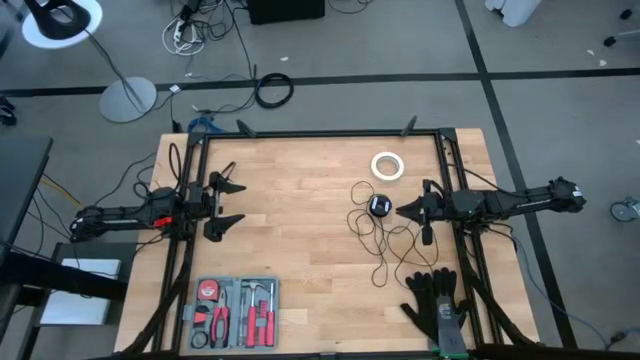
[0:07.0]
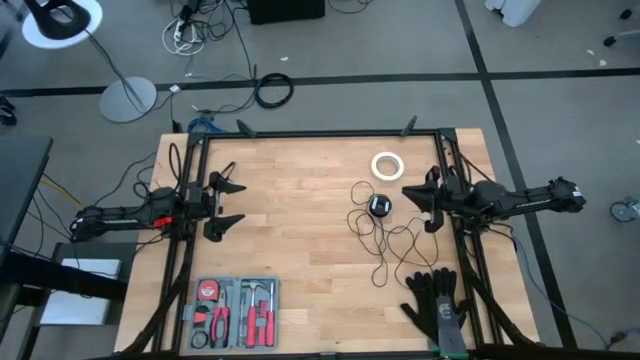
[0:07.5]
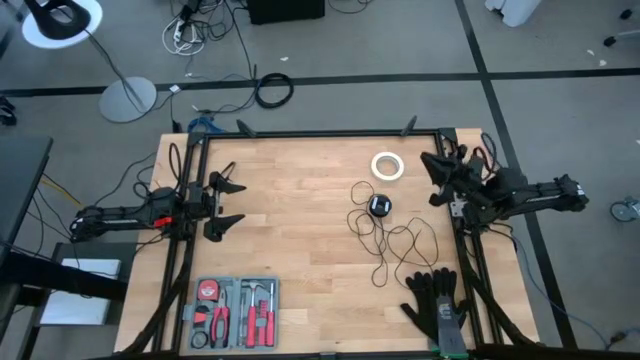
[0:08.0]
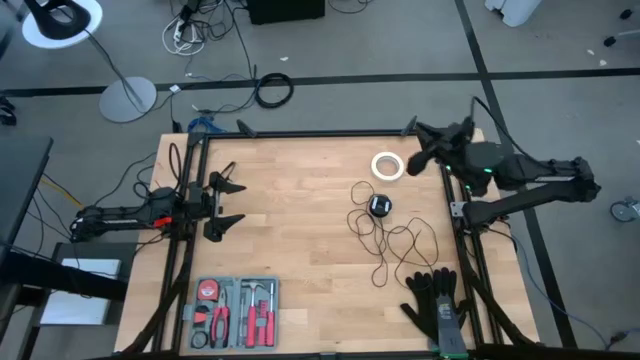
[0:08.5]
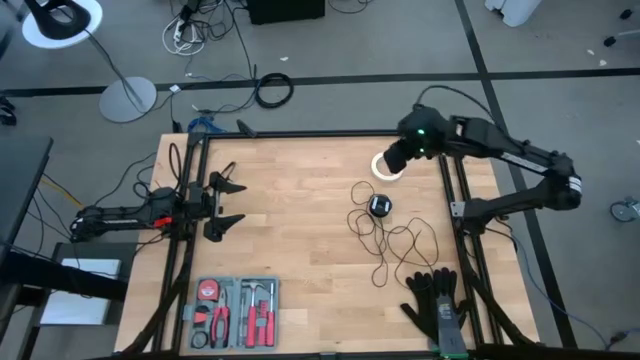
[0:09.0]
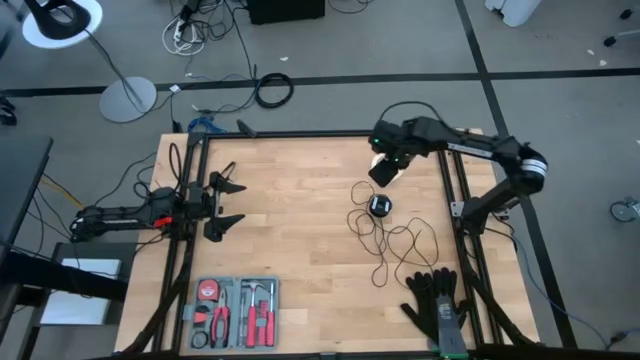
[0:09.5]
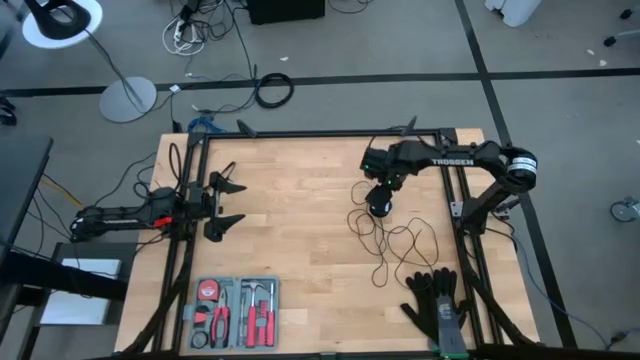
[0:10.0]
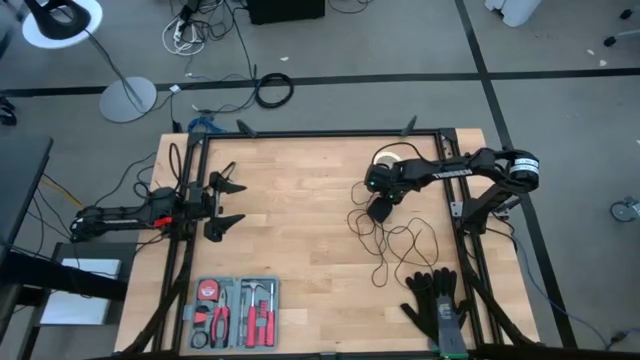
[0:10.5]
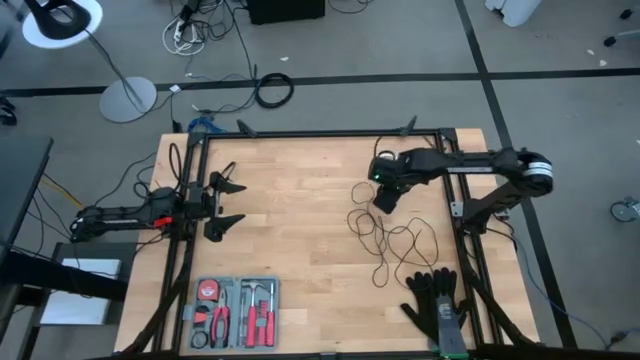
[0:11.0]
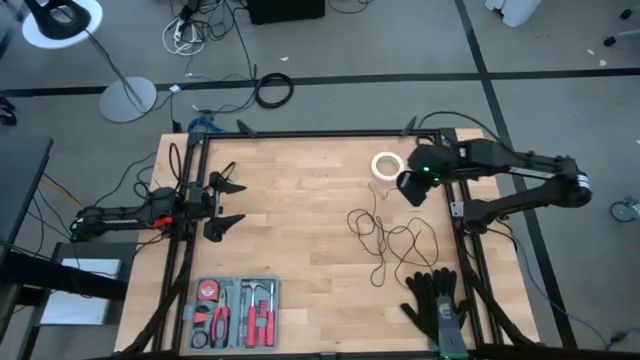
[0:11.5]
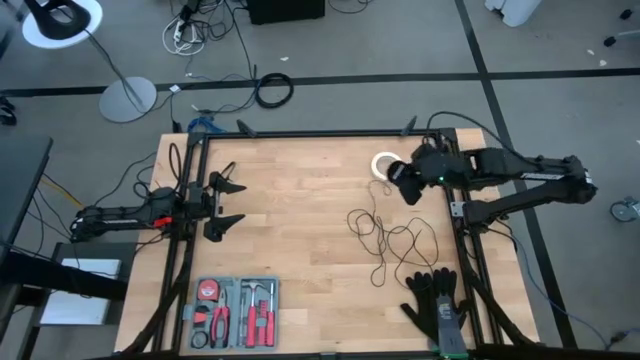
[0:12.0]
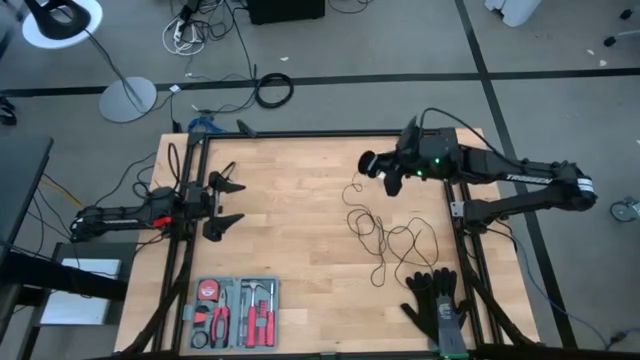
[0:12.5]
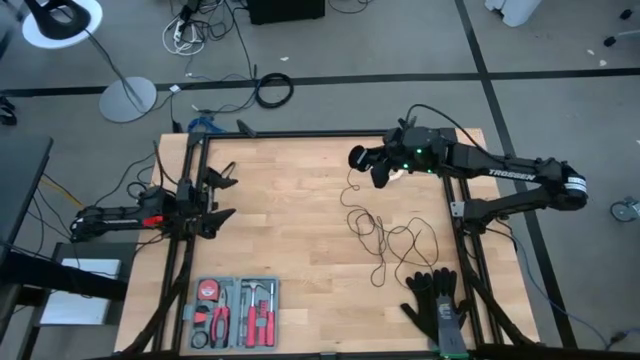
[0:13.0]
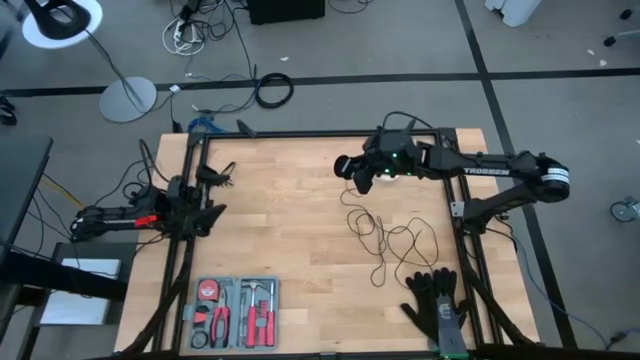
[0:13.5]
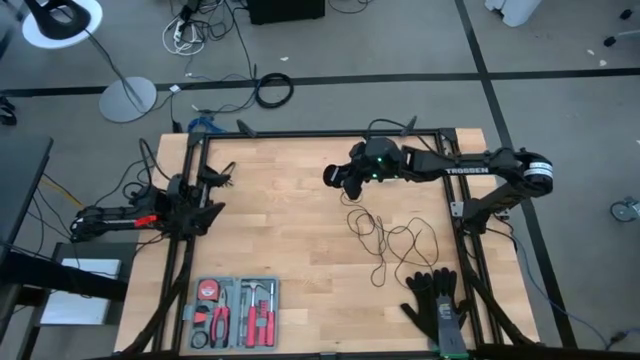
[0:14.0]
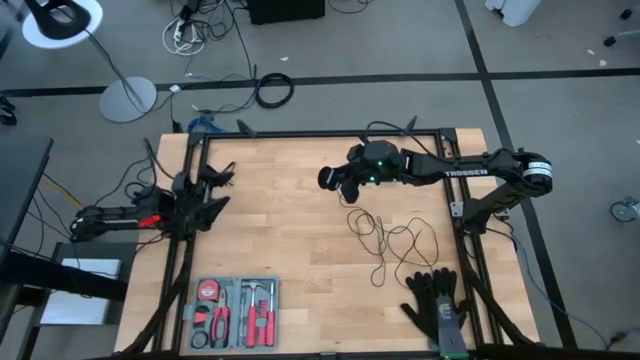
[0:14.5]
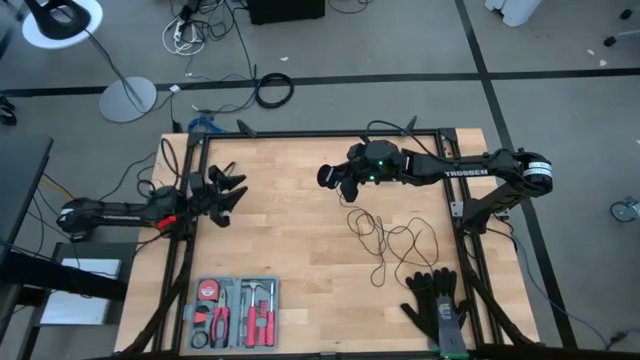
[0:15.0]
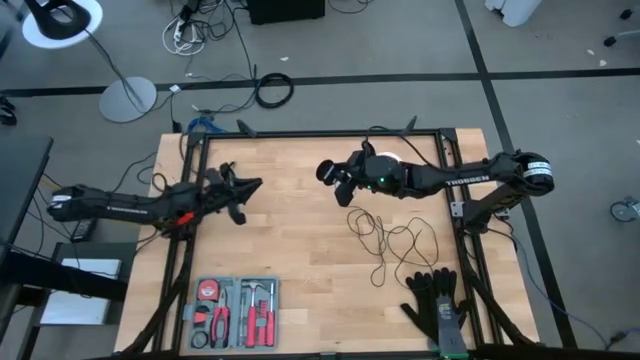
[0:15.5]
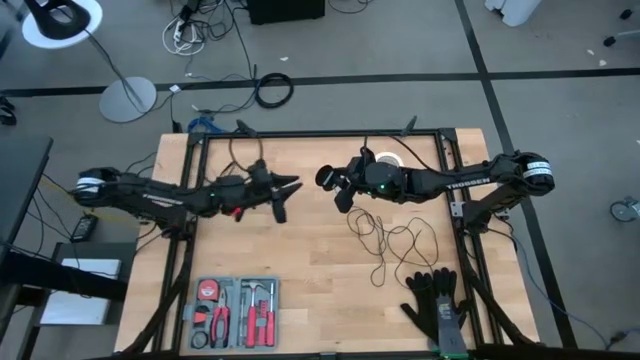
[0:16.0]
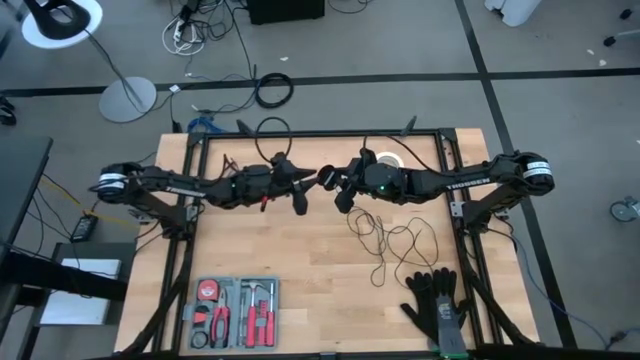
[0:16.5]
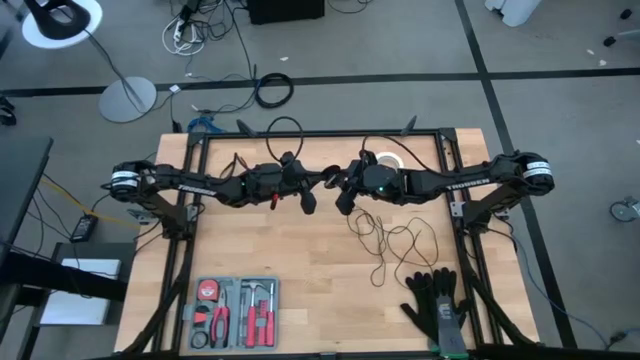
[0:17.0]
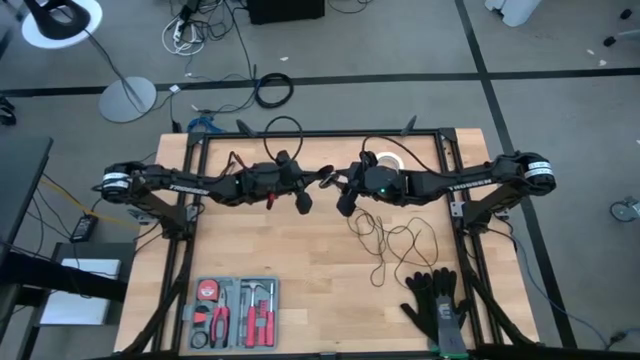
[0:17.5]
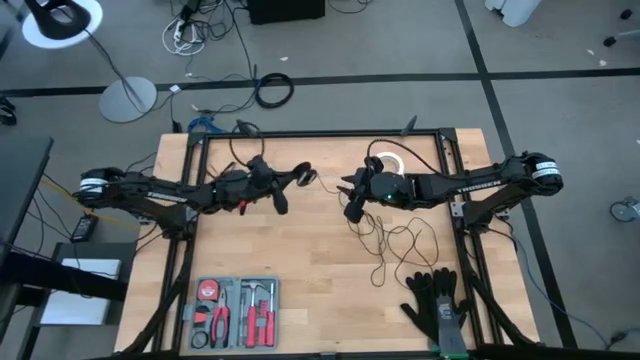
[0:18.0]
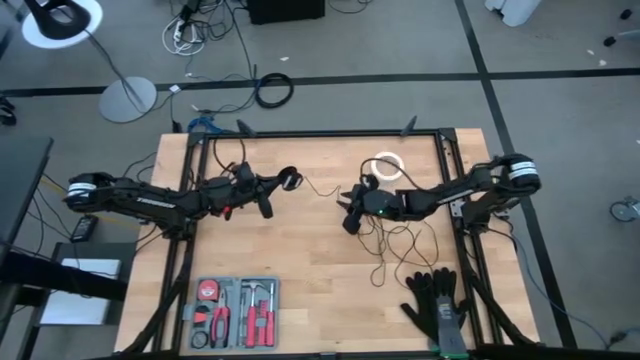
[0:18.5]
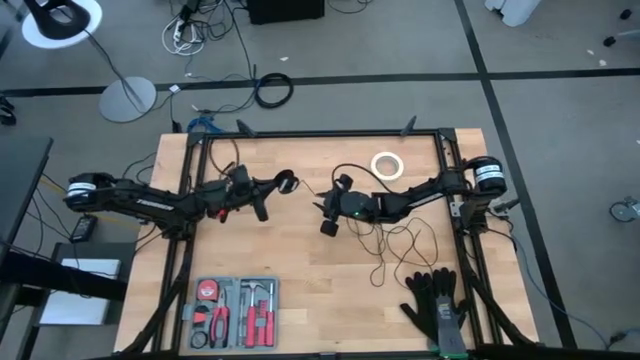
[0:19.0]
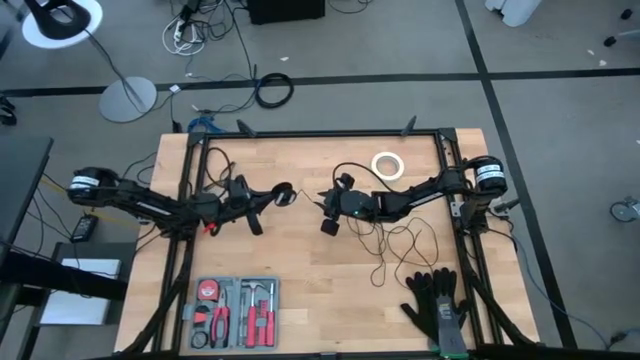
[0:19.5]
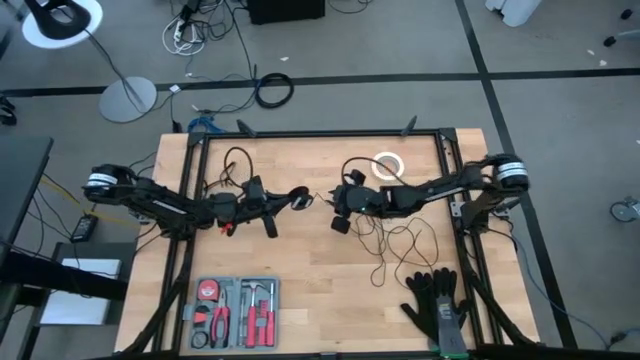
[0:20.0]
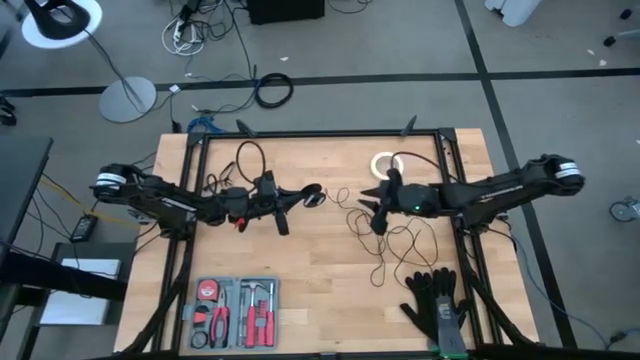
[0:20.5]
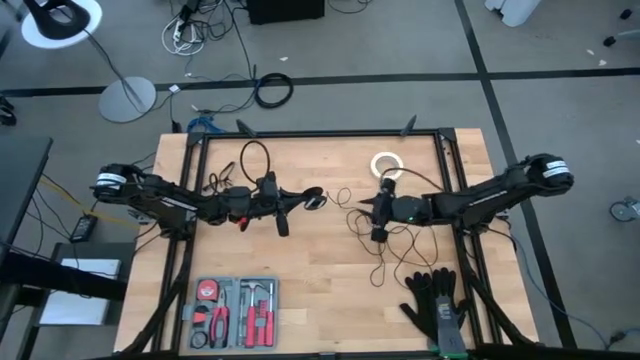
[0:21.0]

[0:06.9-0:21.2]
Task: Coil cords
Coil the black wire on the black spool

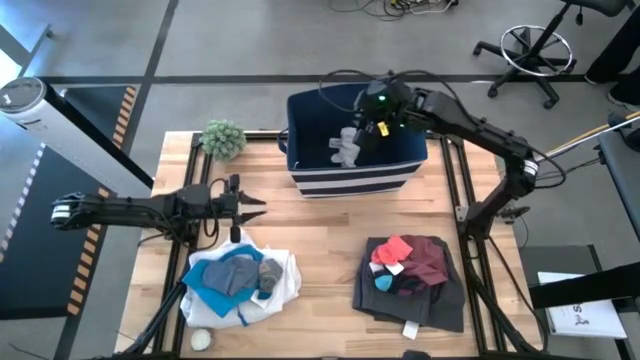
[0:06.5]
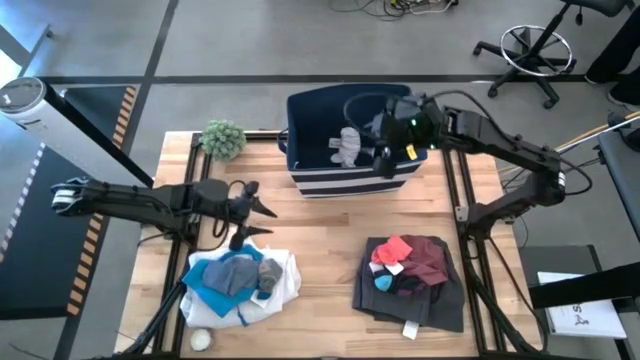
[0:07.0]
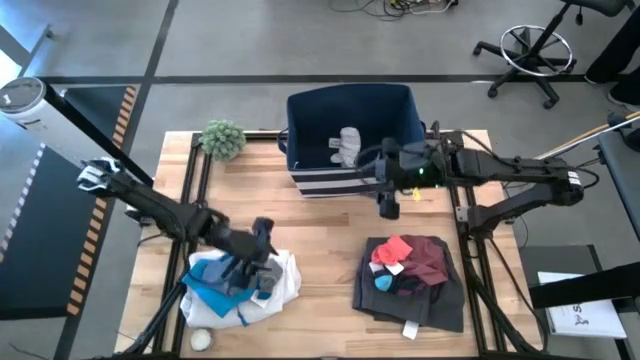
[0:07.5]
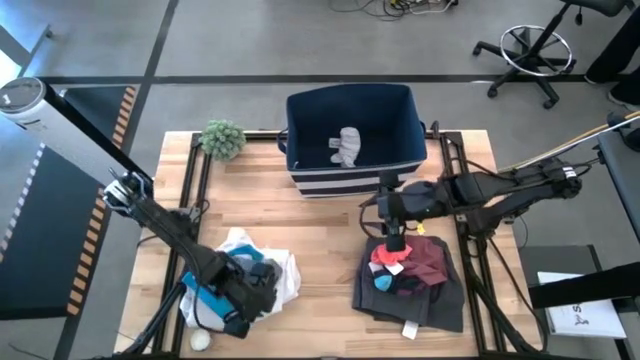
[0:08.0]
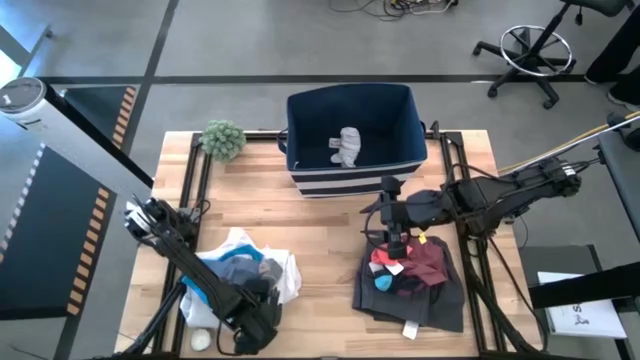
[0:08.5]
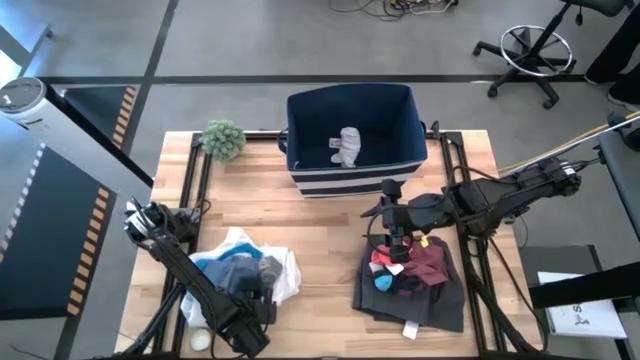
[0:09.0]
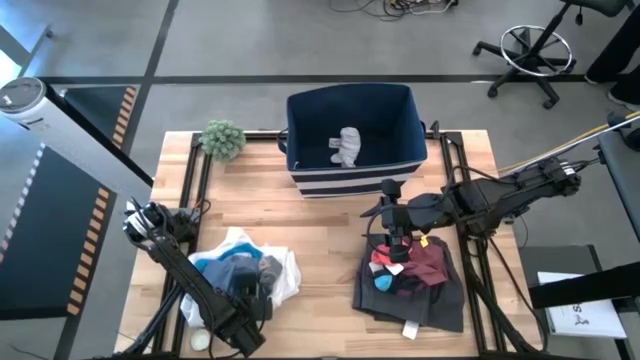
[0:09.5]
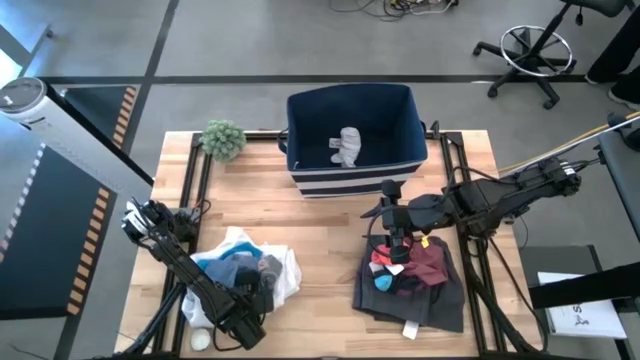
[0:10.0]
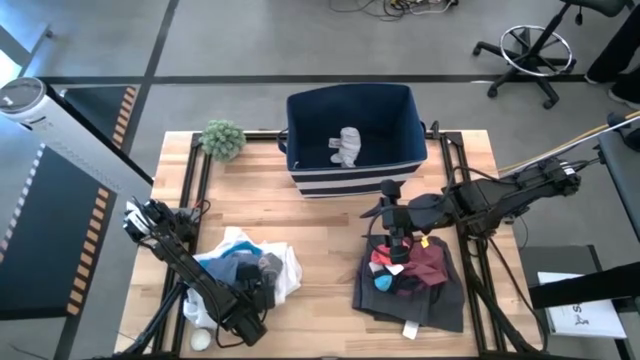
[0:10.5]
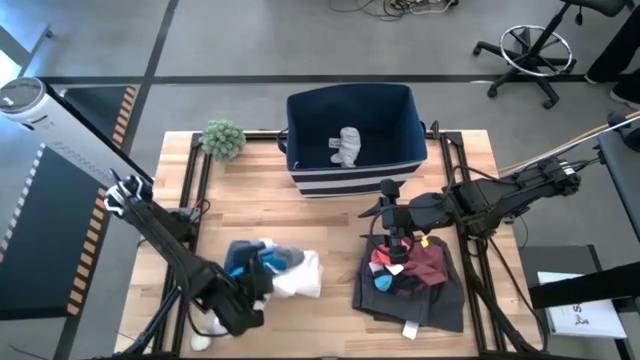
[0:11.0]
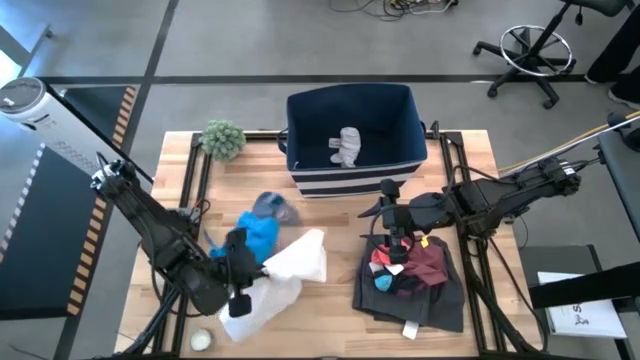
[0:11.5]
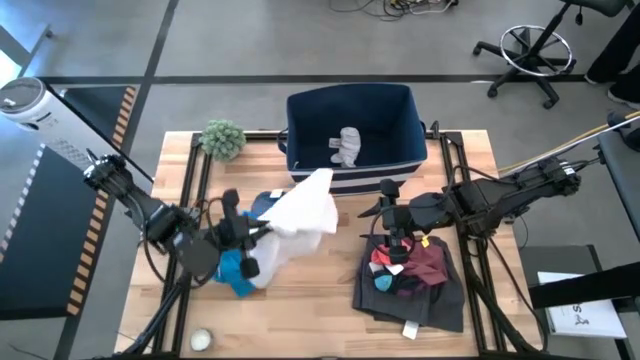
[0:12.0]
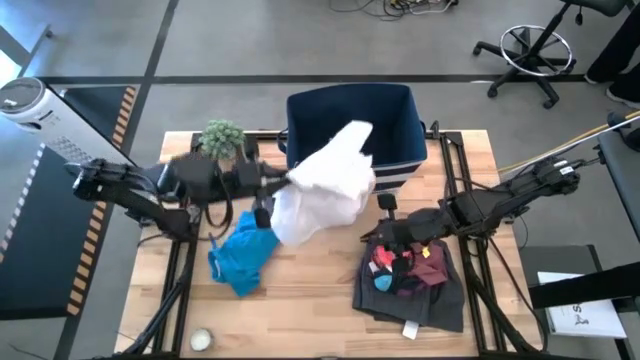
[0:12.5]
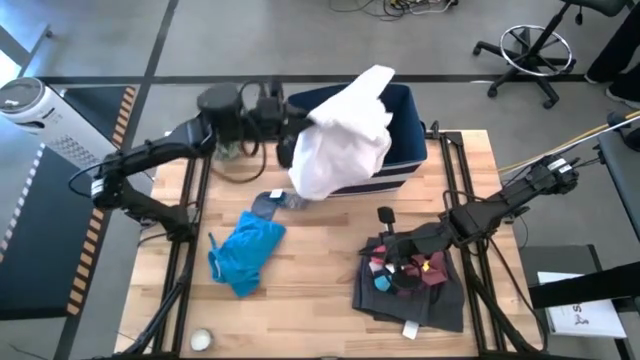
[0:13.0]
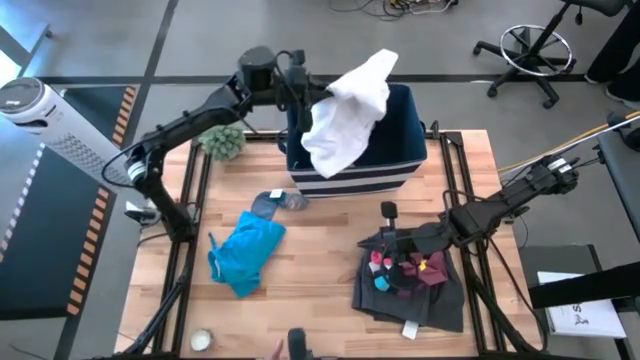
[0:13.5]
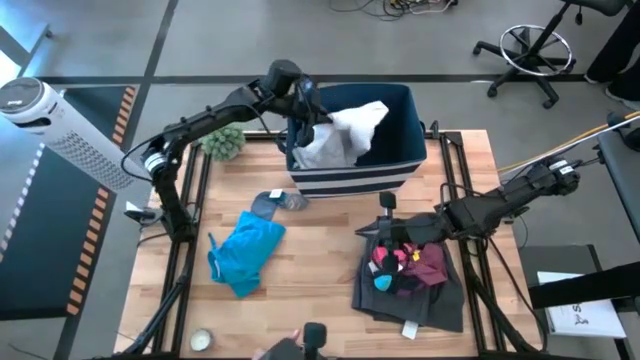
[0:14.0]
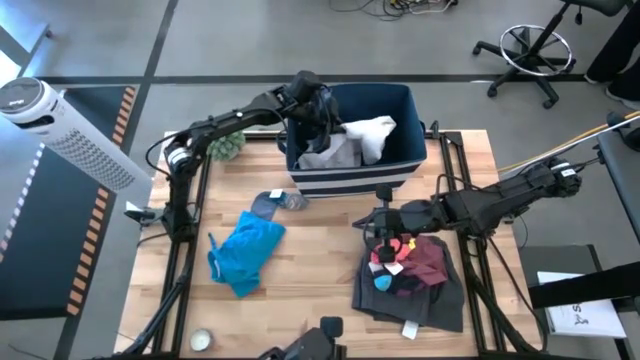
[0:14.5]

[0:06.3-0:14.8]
Task: Sort clothes
Put the white shirt into the blue laundry bin
